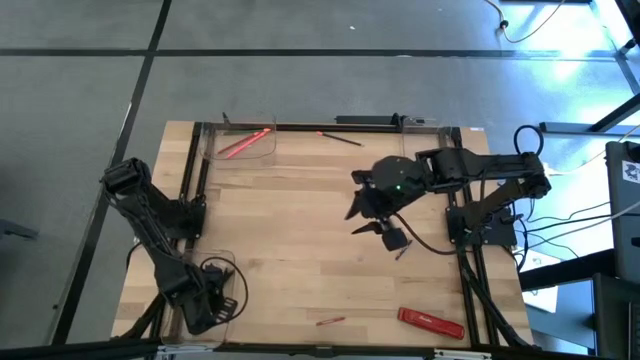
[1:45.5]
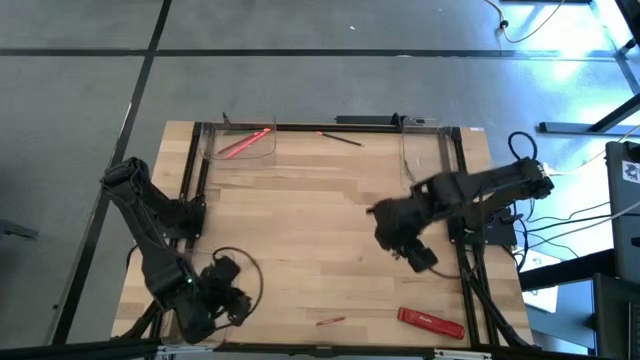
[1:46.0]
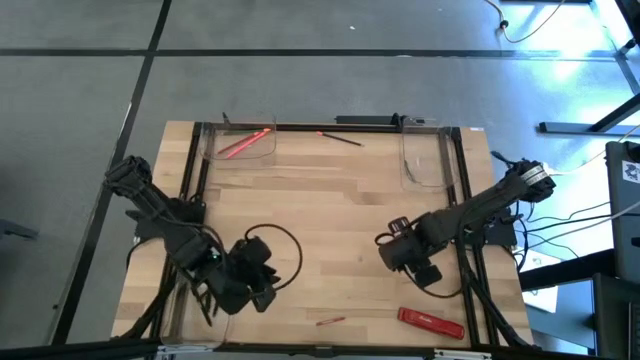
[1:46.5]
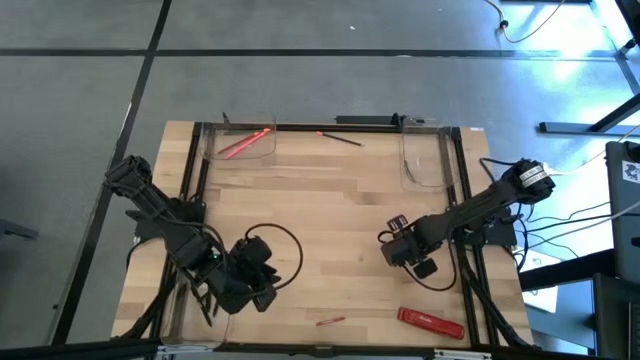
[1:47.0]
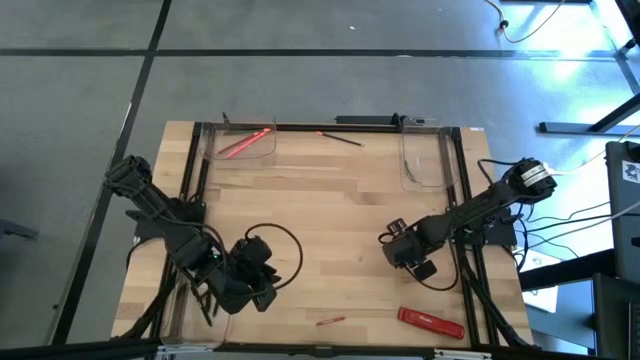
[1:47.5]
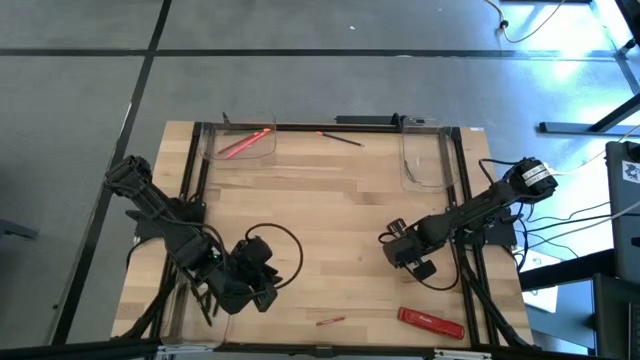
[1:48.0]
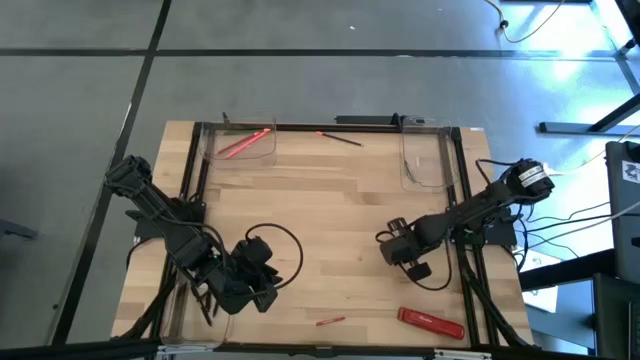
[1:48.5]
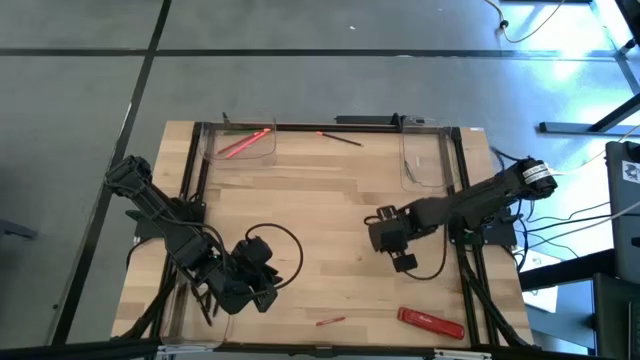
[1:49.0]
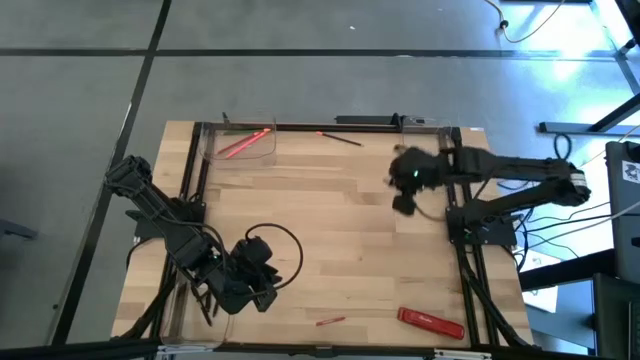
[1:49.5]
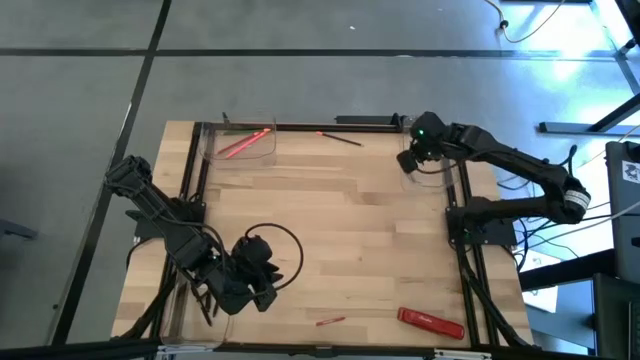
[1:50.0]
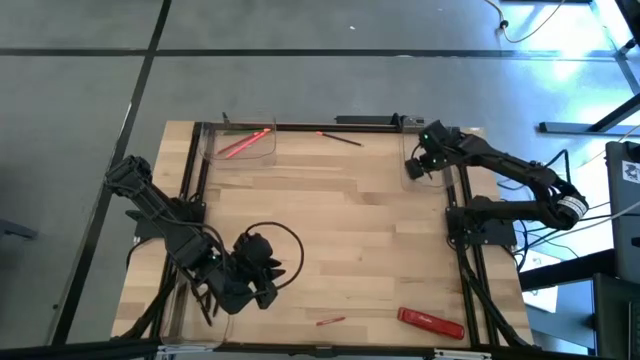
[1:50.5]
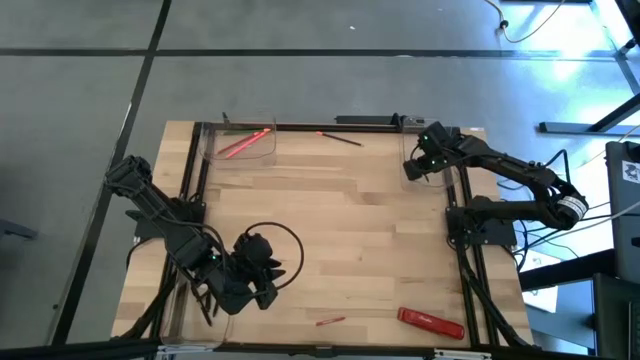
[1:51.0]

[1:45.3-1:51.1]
Task: Sort crayons/erasers/pens/pencils in bins
Put the blue crayon into the top right transparent bin

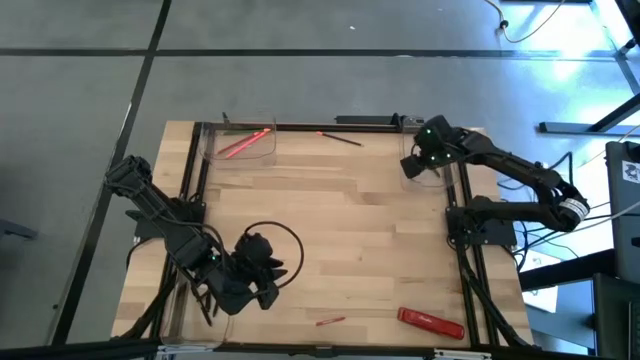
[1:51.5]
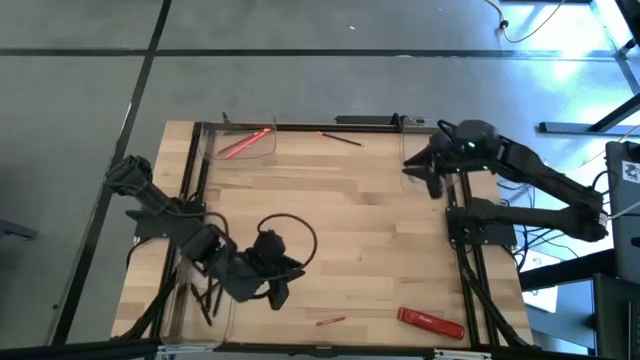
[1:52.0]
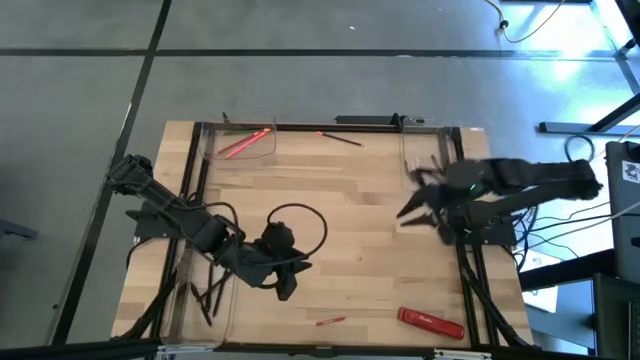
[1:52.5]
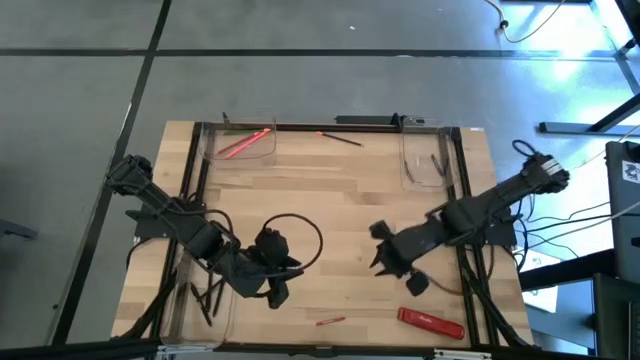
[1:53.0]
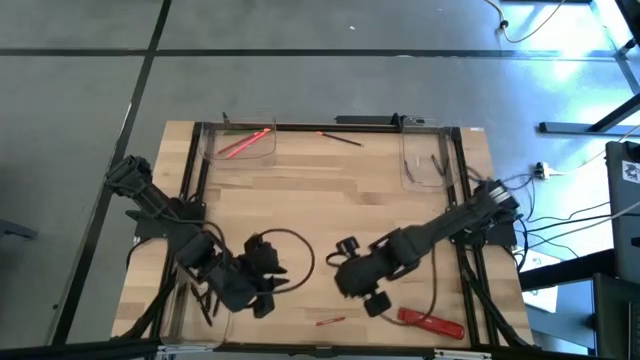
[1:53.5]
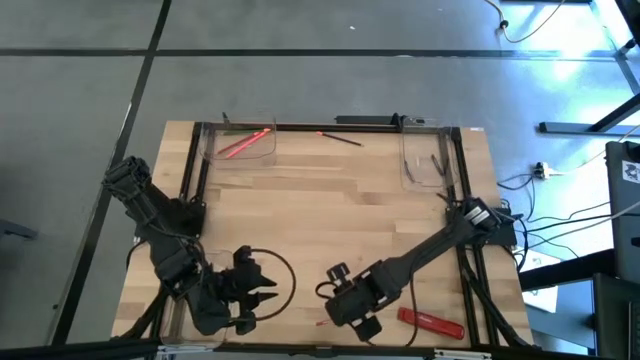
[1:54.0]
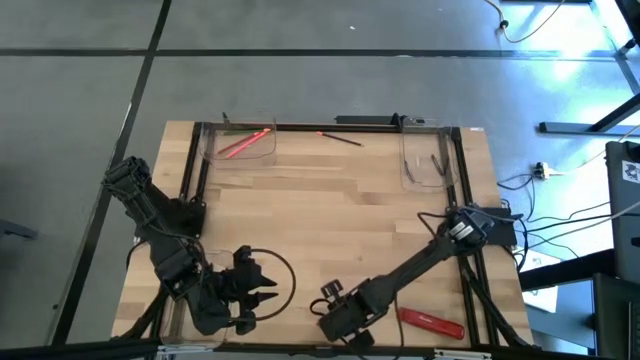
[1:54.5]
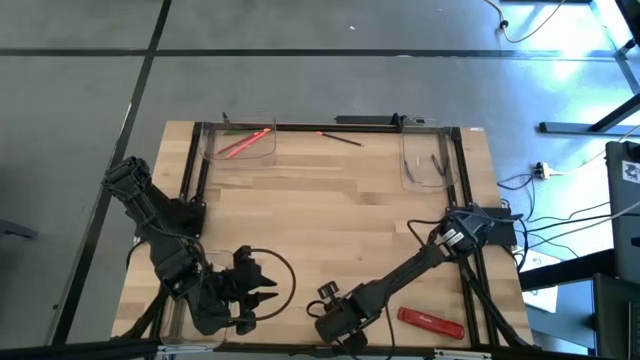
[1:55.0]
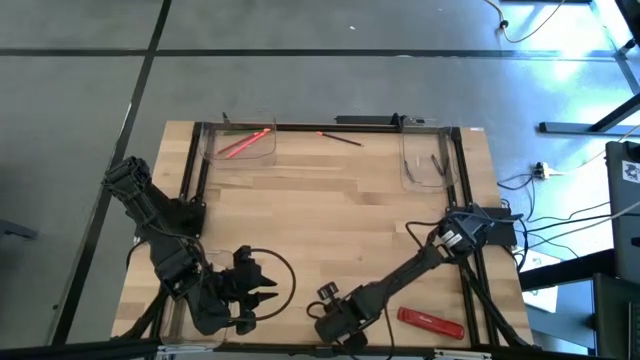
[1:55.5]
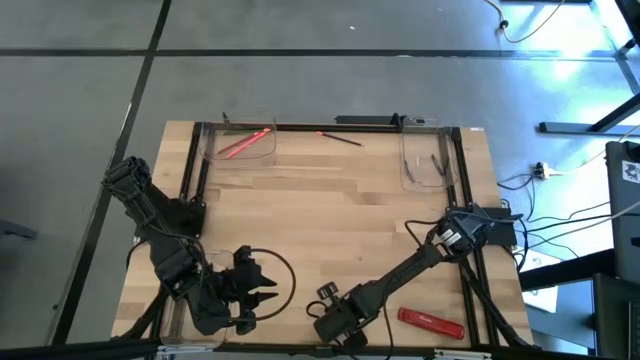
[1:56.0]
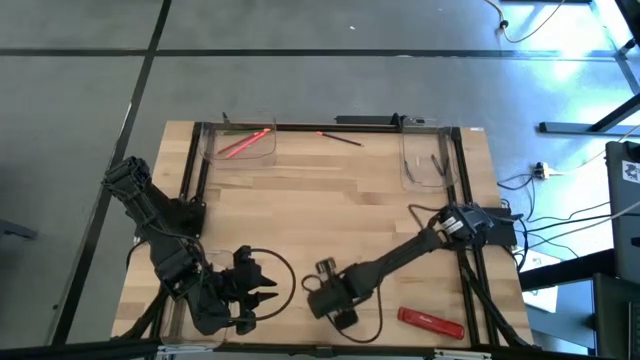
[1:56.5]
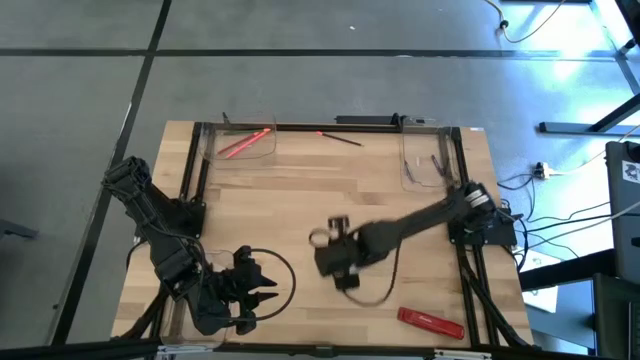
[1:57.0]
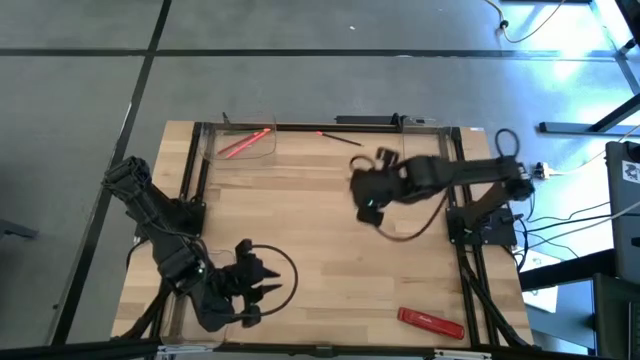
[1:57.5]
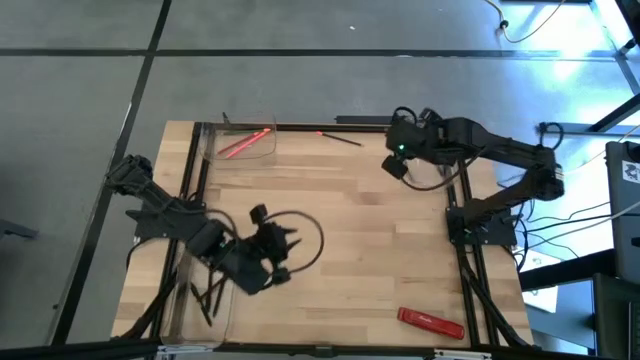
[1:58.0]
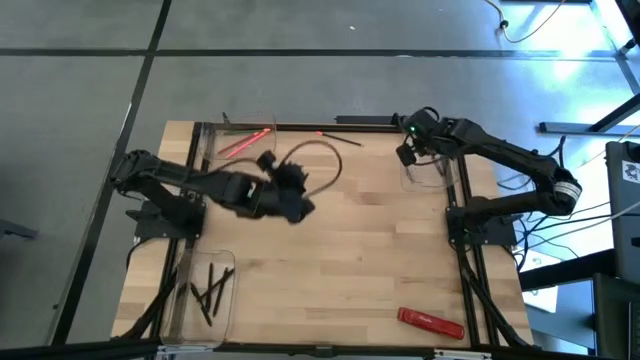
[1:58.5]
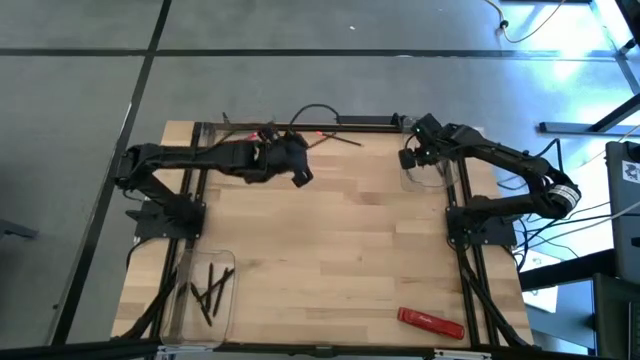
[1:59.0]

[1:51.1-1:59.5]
Put the red crayon into the top right transparent bin

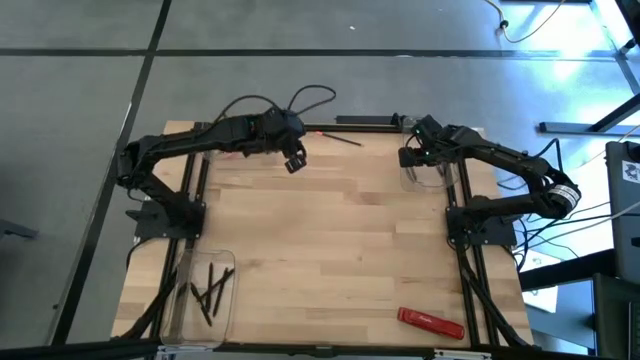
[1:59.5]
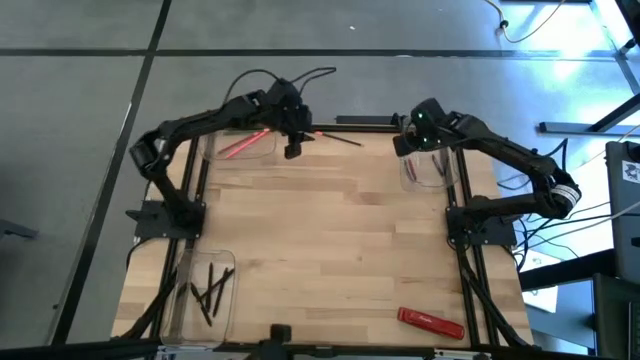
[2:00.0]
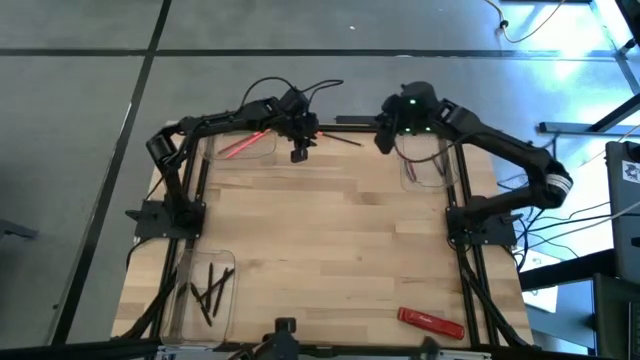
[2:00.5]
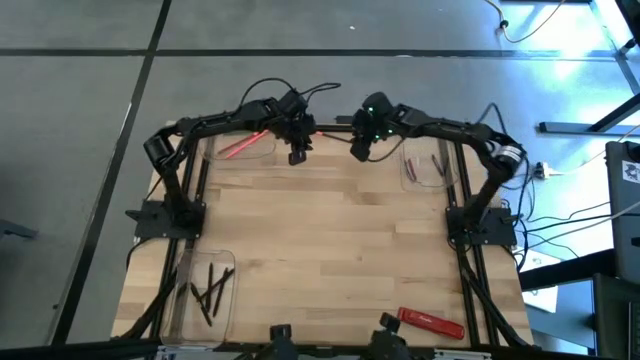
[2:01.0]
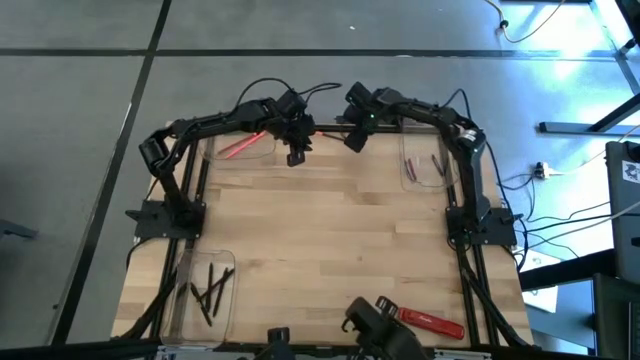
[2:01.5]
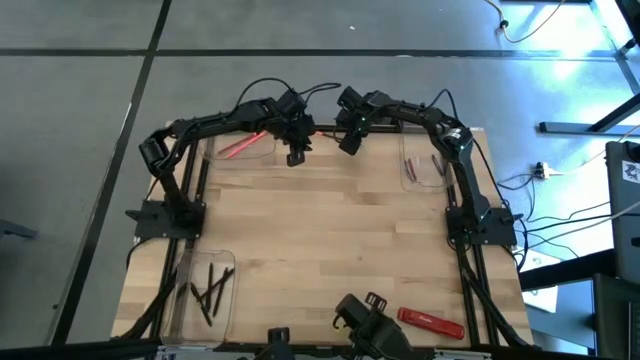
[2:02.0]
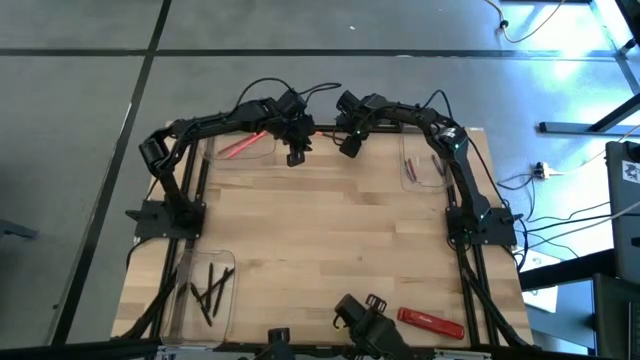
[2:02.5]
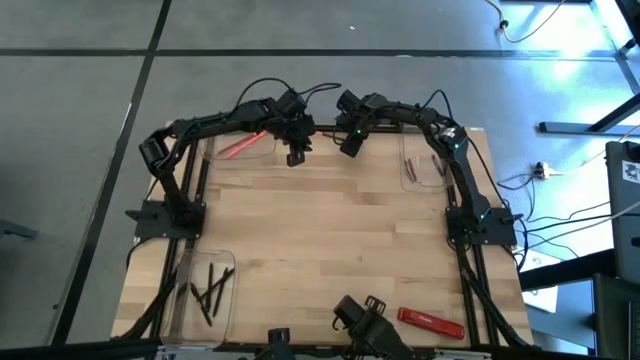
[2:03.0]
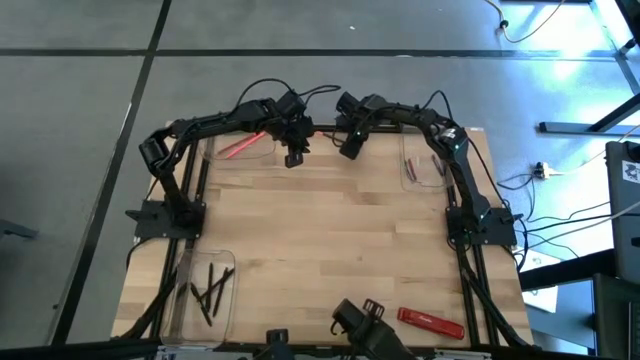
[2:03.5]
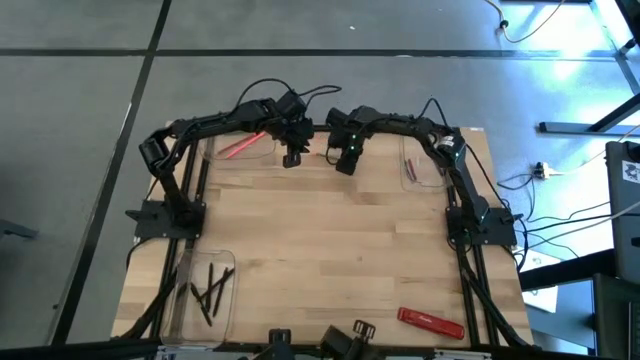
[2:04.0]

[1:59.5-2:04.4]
Put the blue pencil into the top left transparent bin

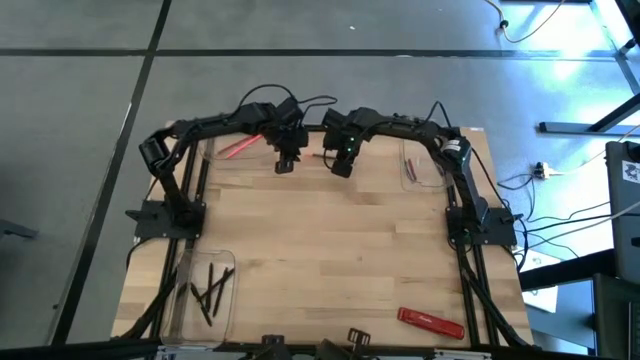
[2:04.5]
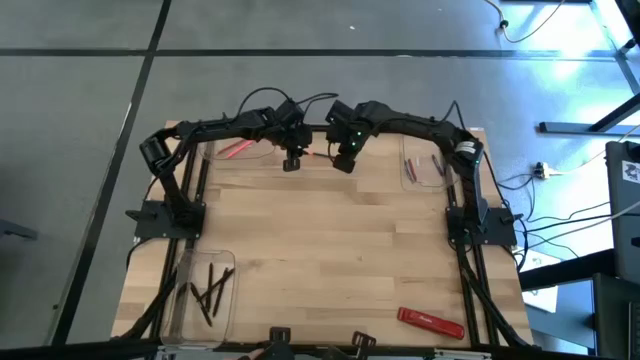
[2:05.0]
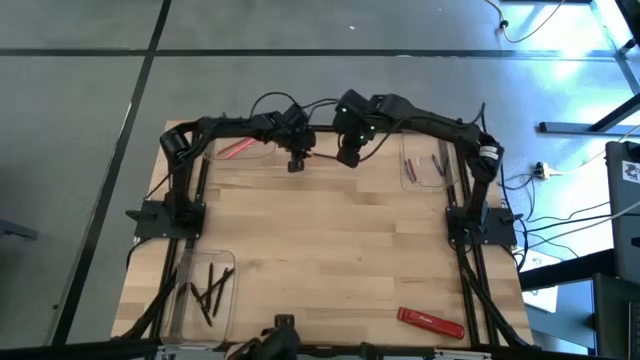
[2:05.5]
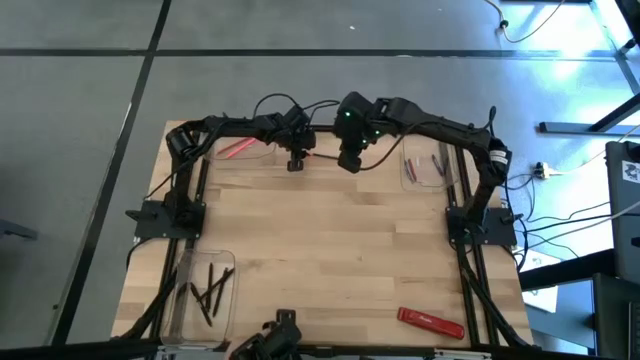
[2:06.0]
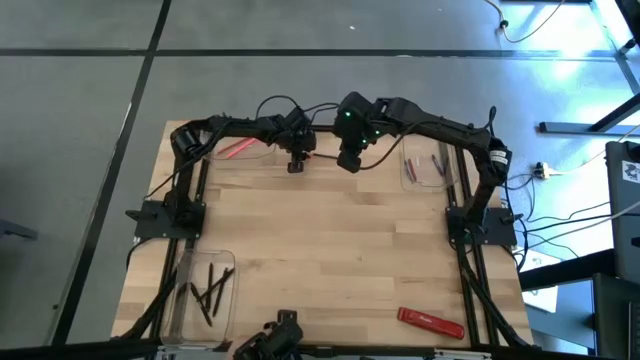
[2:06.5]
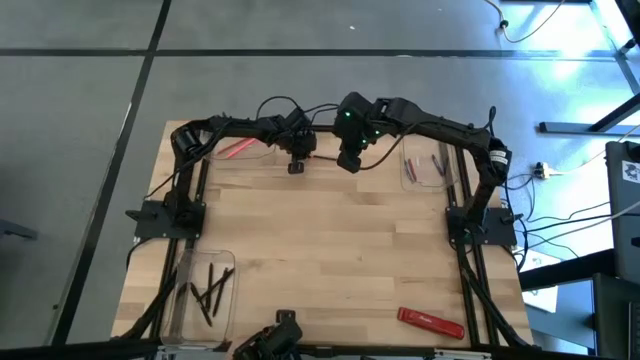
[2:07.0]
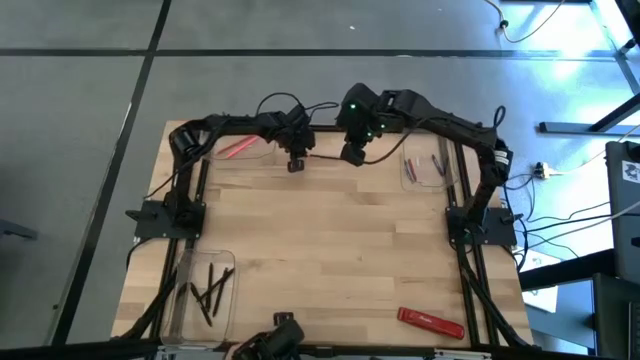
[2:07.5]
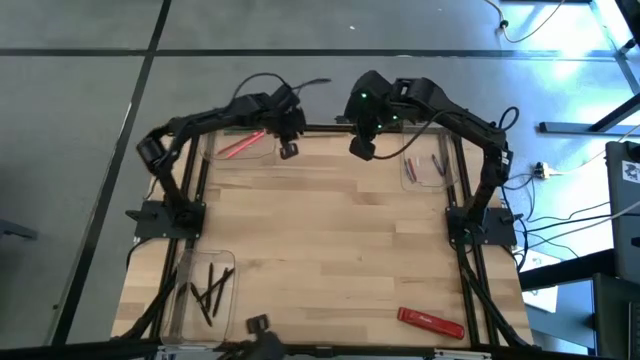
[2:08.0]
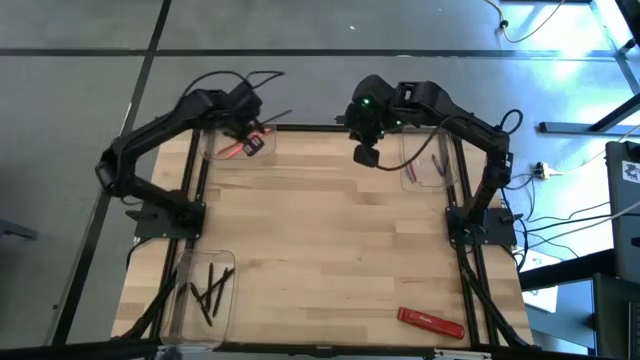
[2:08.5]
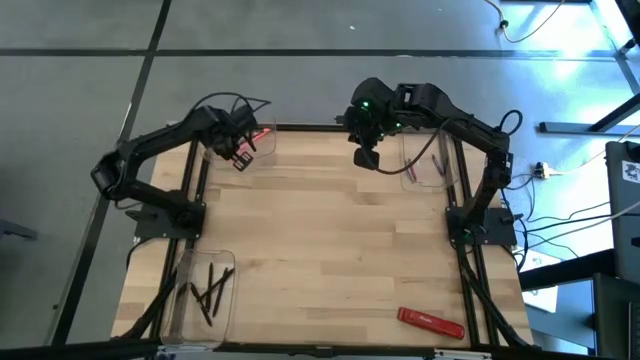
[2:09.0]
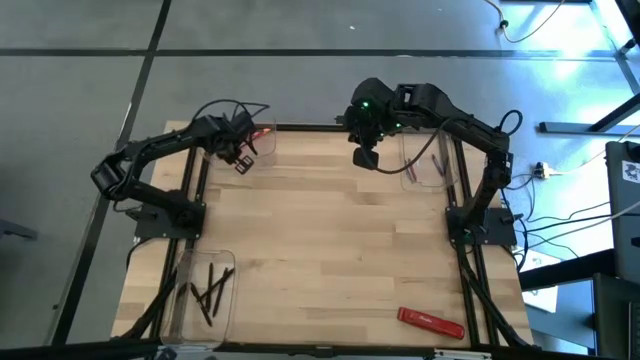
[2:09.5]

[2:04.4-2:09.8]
Put the blue pencil into the top left transparent bin
